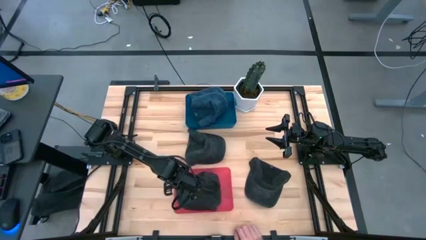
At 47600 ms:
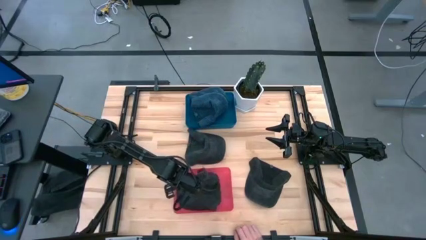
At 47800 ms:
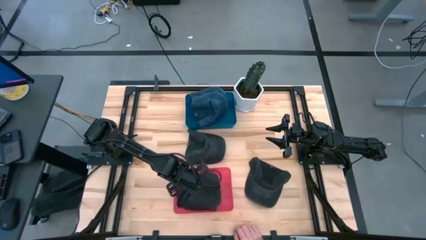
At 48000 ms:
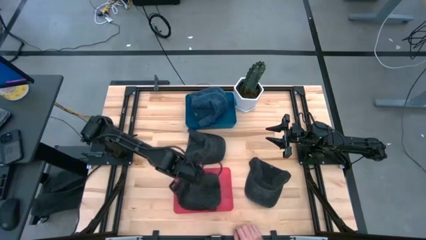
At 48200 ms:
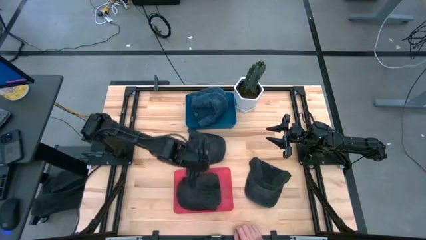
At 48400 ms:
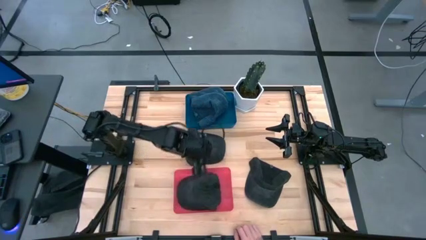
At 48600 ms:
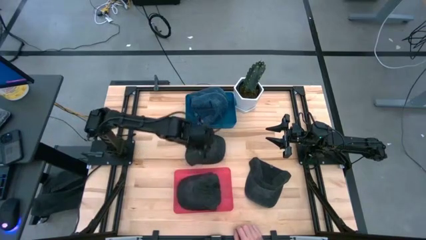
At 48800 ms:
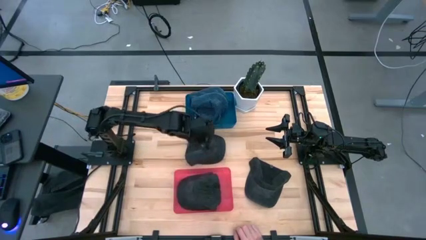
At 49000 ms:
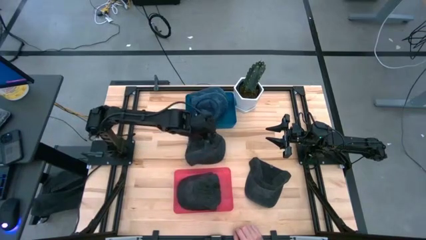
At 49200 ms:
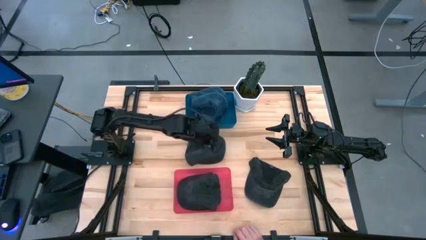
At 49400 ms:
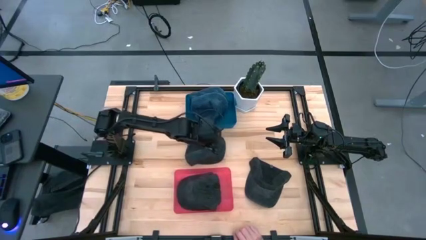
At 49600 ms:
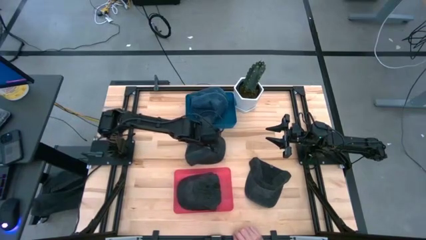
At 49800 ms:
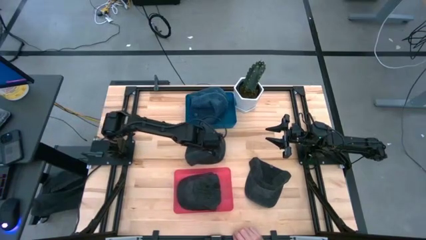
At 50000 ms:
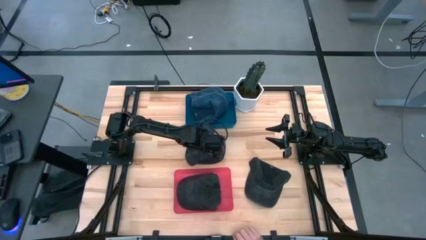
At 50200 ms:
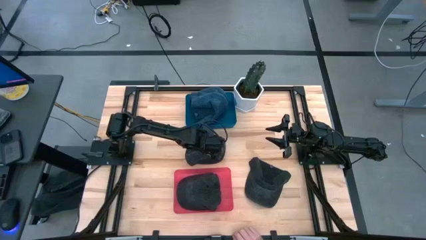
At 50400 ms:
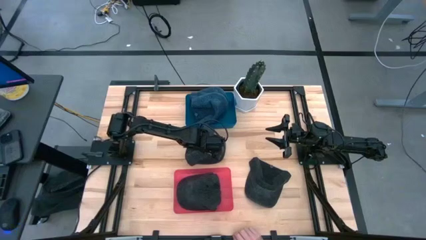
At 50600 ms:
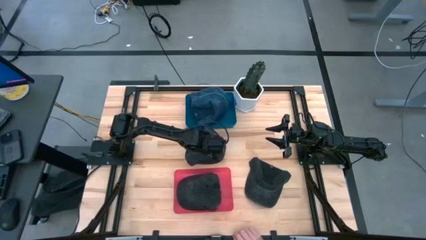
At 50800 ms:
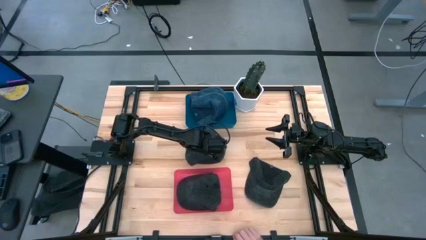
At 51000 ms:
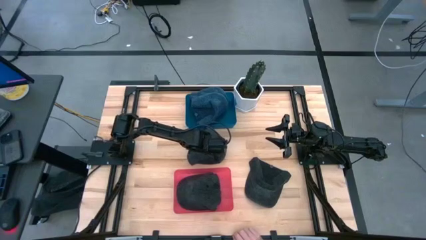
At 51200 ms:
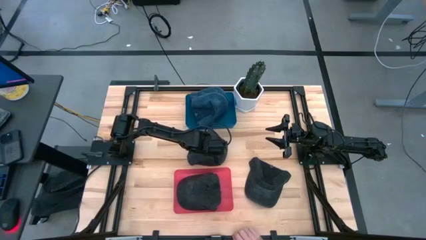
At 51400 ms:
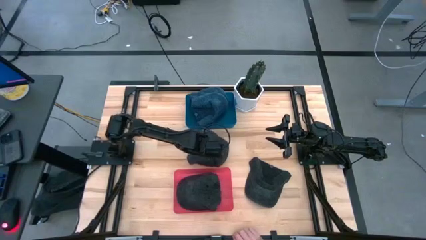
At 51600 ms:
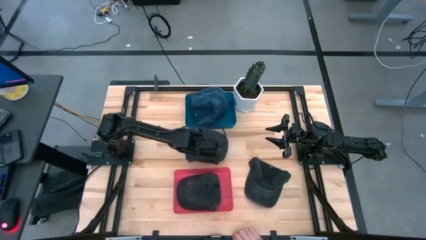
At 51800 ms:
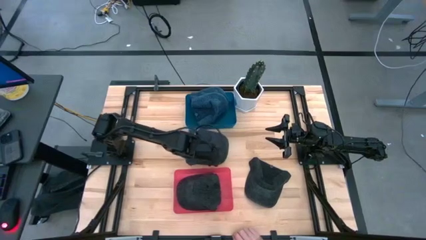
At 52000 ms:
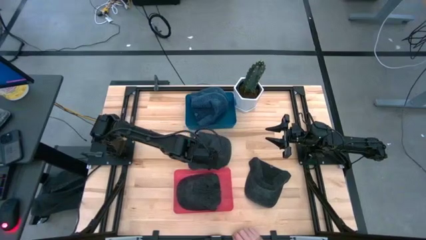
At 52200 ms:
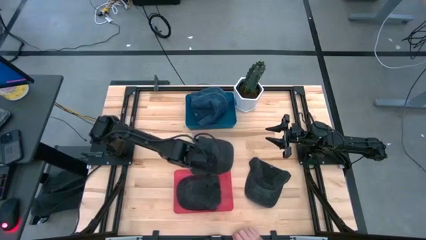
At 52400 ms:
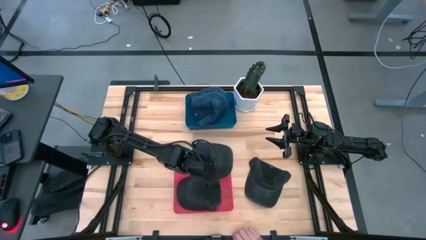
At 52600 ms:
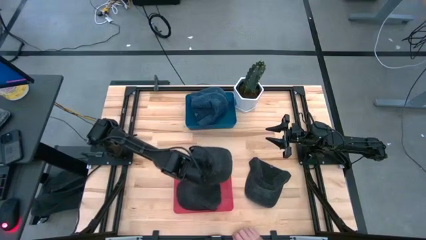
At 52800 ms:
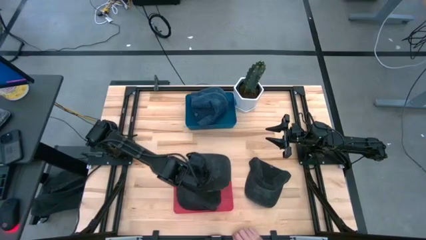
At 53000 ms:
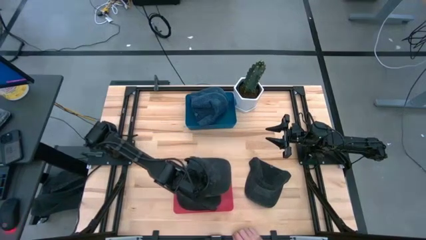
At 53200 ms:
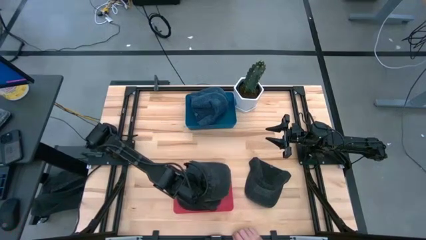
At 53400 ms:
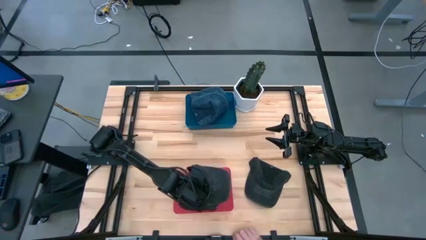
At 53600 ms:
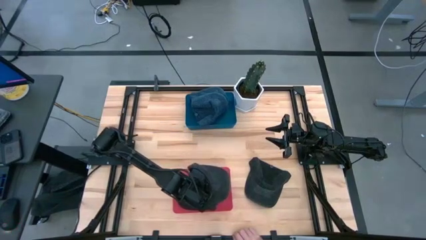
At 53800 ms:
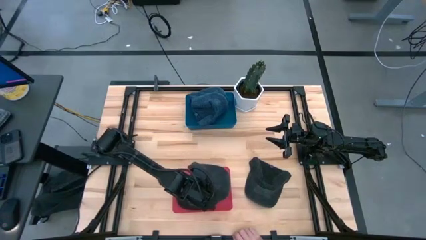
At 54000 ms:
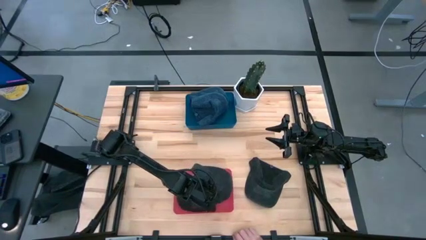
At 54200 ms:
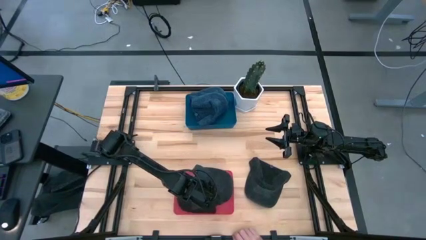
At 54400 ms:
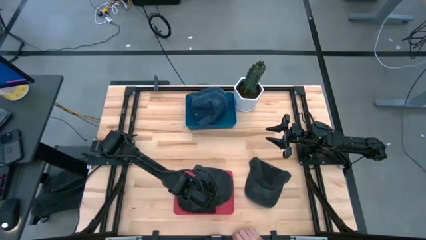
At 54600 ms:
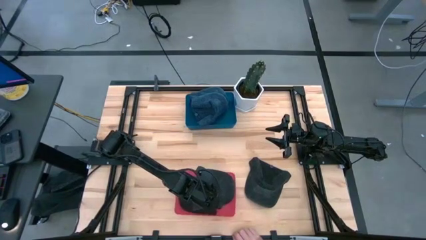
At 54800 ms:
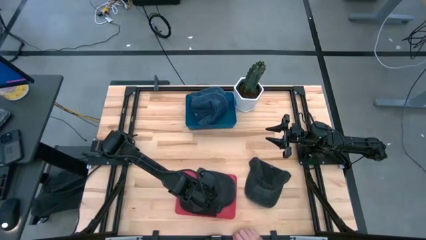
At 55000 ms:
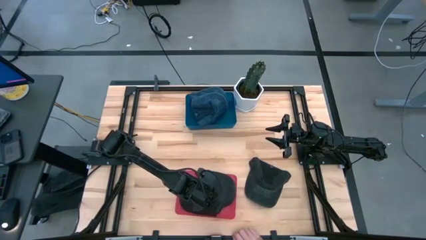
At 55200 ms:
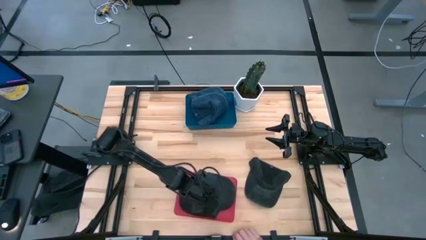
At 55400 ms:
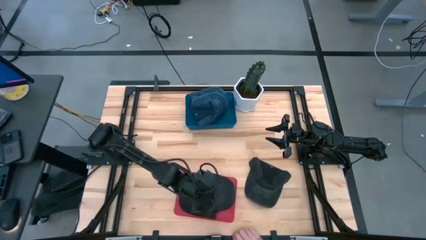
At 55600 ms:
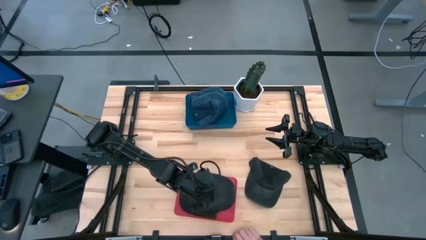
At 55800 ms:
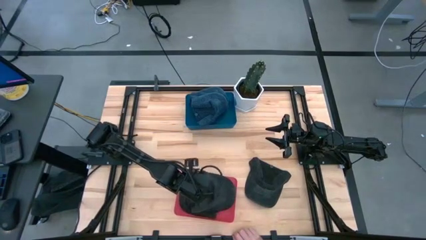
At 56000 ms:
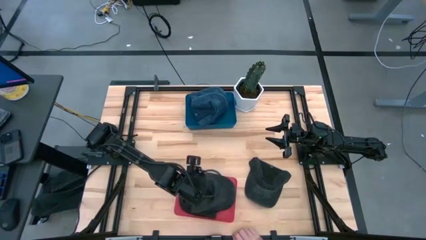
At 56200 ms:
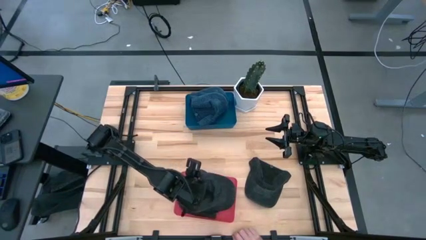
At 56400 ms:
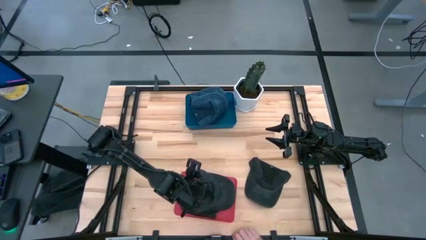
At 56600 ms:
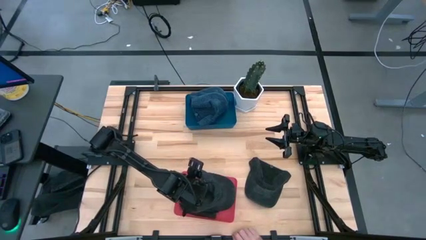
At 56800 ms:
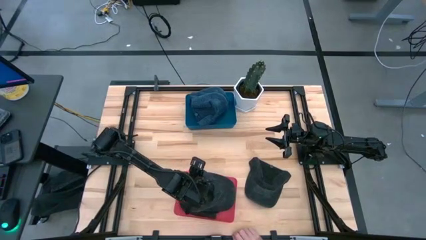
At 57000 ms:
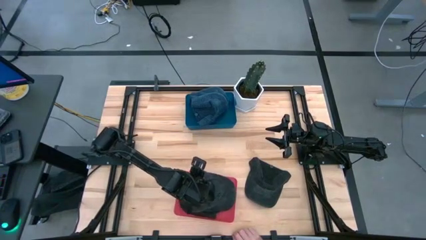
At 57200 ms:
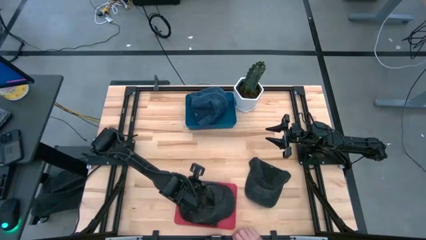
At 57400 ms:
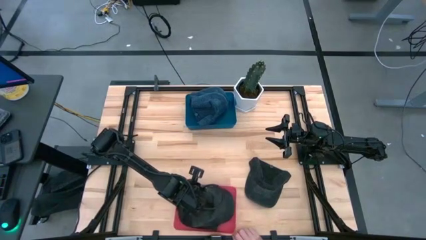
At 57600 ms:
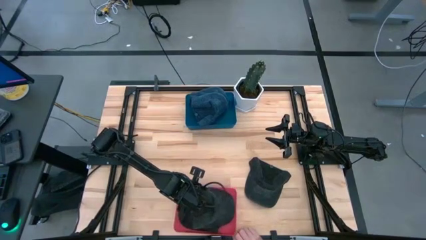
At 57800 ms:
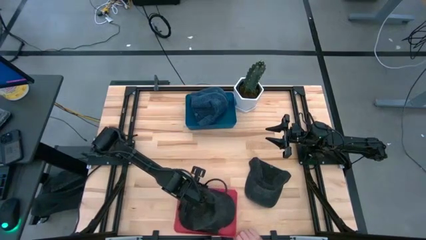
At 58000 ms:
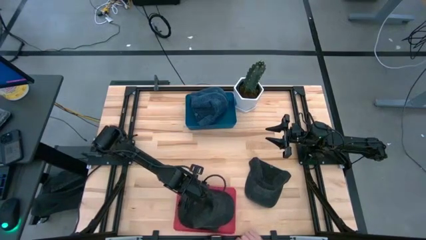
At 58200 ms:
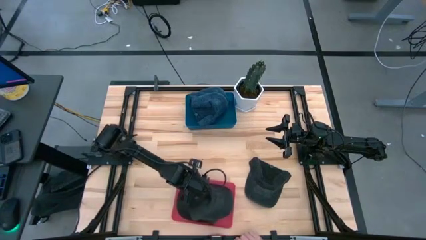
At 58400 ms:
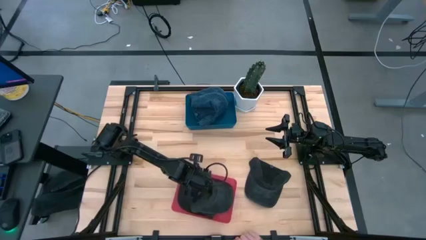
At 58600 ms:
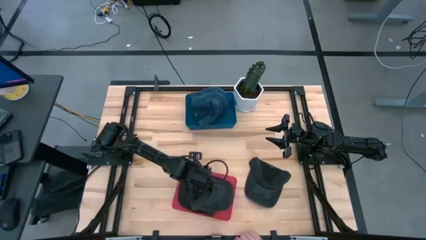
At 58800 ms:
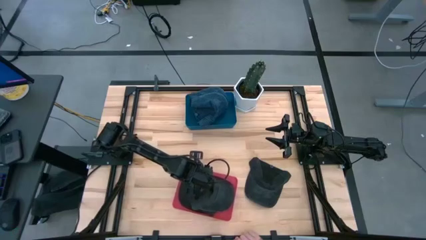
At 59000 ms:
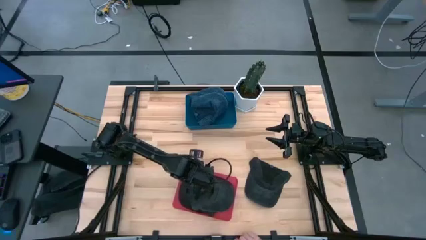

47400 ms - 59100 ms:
Task: Pick & Place hat
Put the middle black cap into the pink bin

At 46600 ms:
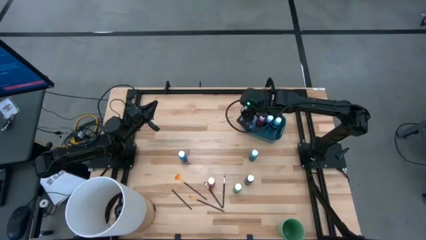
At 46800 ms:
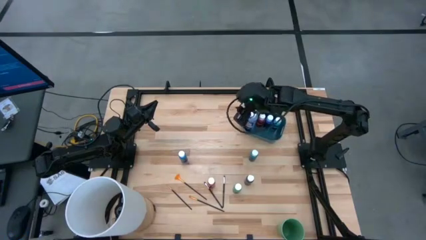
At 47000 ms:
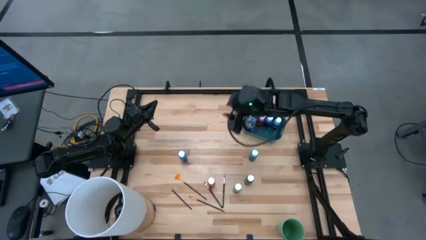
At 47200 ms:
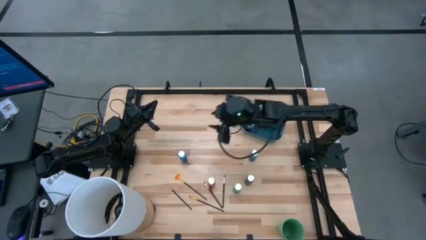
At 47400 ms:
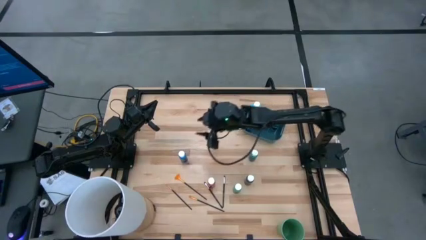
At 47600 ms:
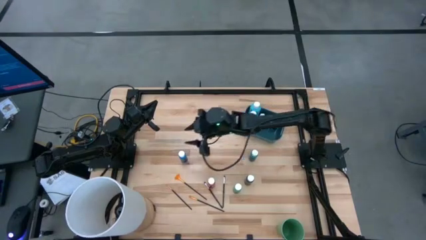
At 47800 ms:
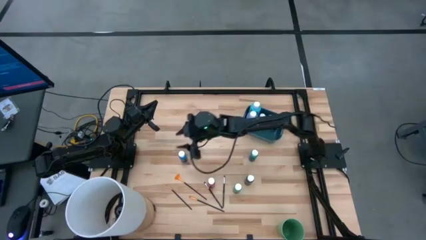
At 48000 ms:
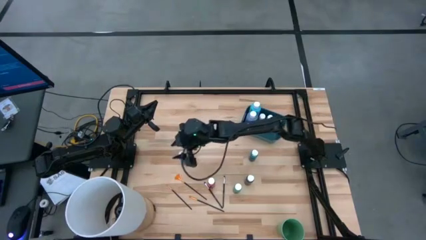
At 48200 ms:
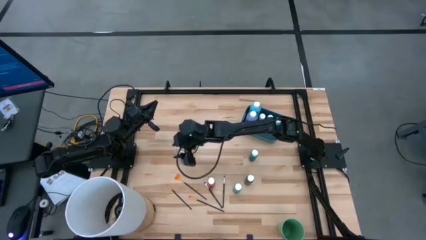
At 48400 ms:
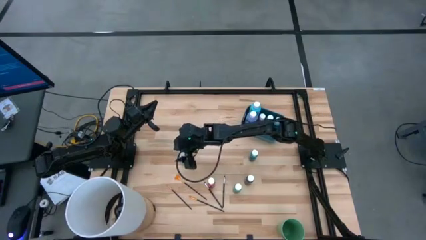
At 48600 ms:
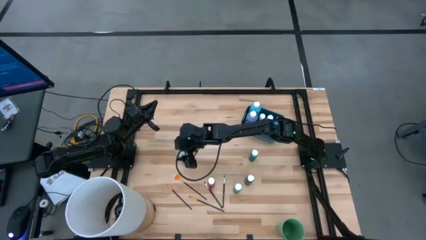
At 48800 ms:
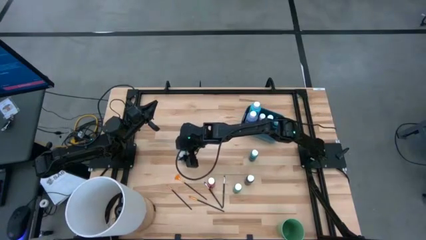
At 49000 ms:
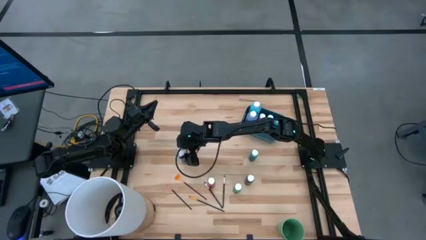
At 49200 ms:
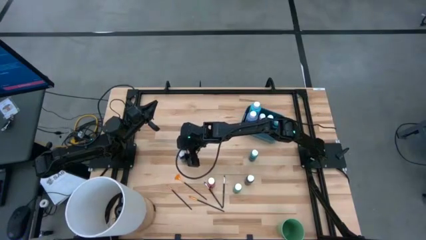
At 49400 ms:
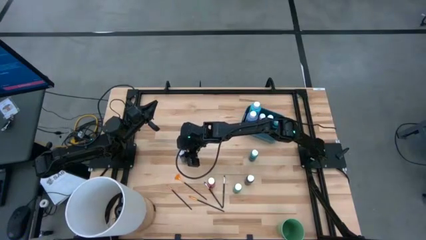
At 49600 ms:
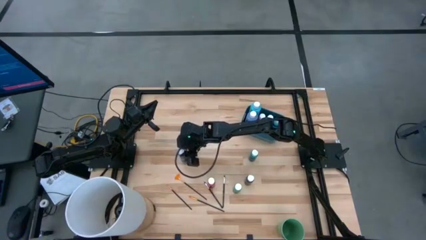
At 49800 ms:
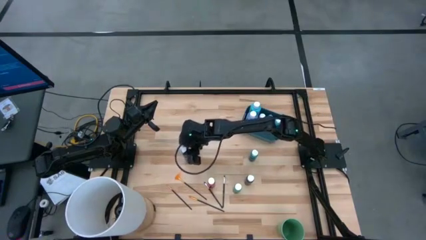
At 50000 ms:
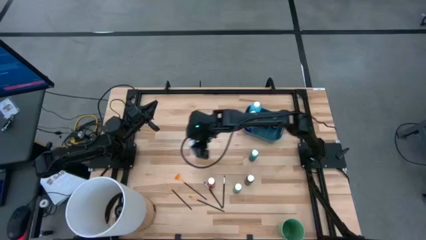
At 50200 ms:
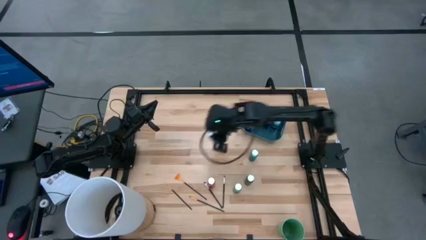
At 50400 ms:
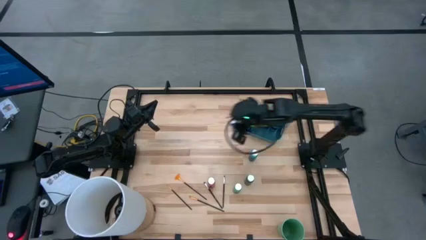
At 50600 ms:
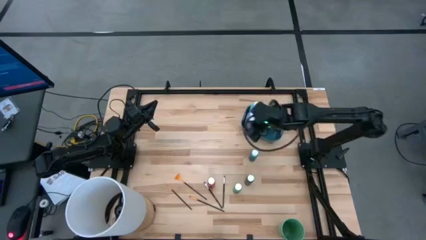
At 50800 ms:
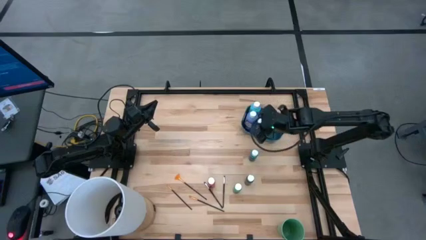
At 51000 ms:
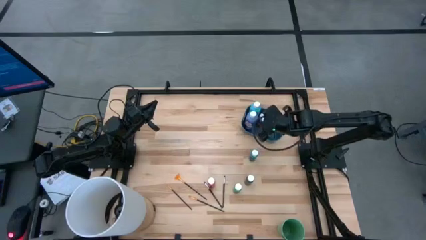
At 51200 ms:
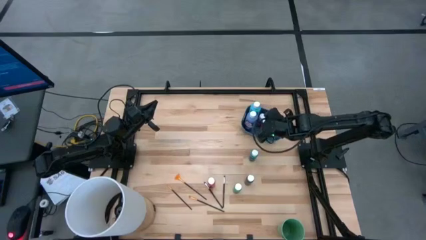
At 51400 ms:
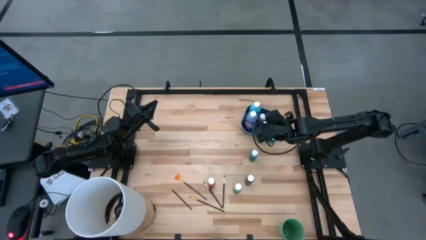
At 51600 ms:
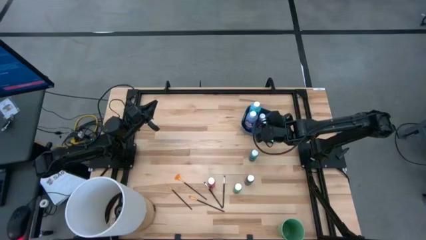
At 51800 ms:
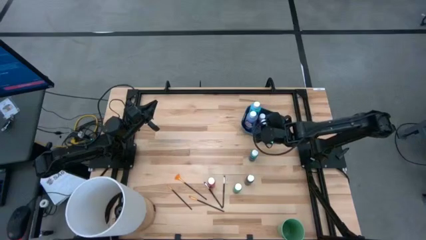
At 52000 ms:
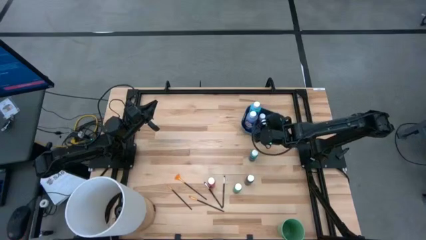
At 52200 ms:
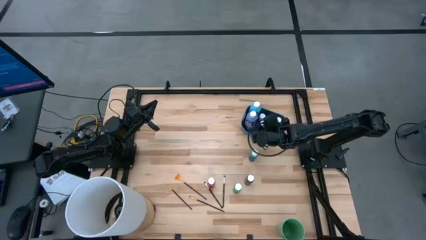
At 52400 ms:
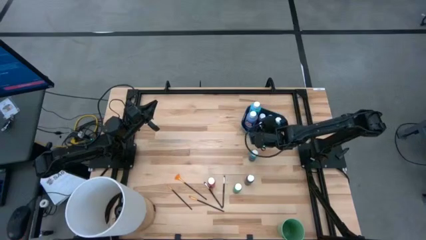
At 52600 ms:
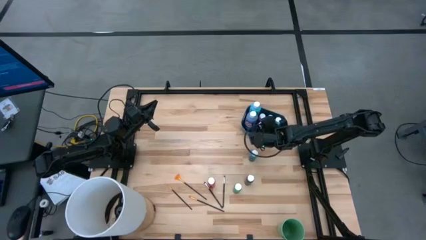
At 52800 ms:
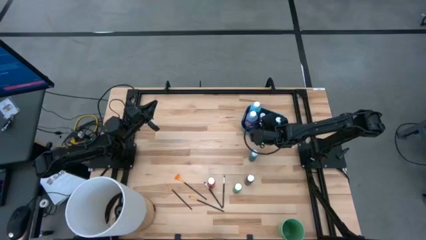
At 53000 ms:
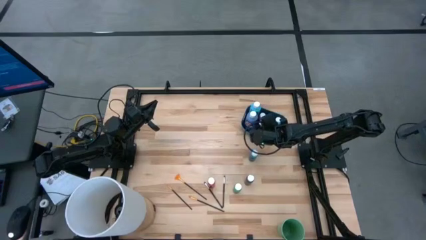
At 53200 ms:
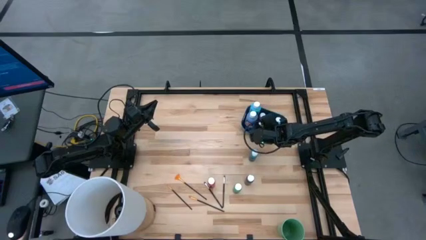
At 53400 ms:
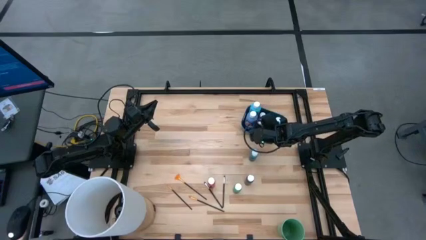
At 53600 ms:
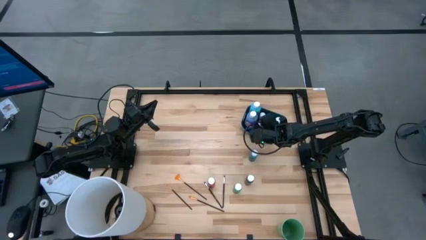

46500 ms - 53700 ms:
Task: Pick & Place Paint Supplies
Put the small blue paint bottle into the blue bin
